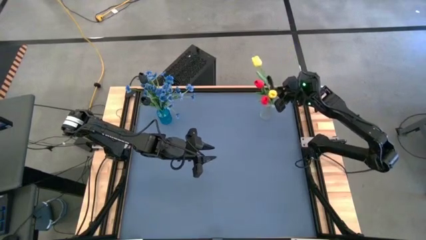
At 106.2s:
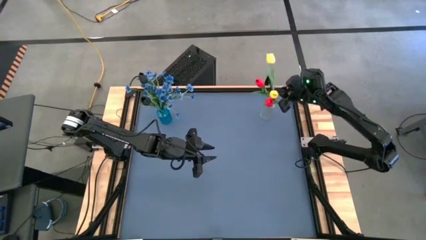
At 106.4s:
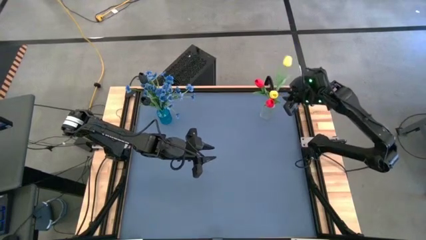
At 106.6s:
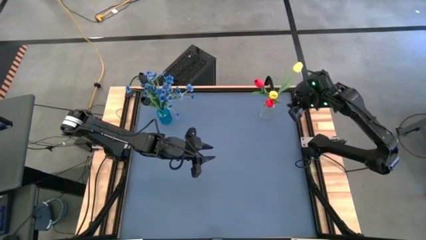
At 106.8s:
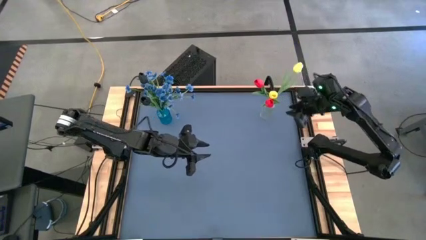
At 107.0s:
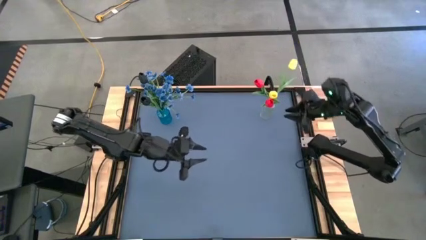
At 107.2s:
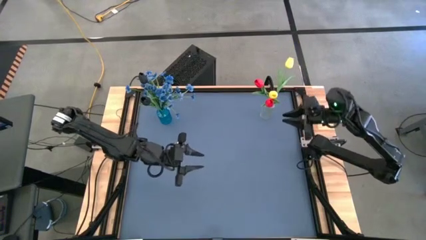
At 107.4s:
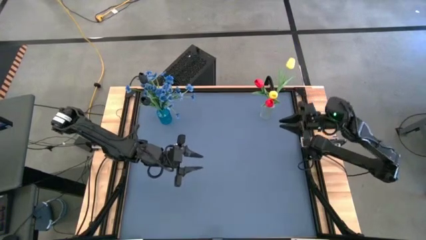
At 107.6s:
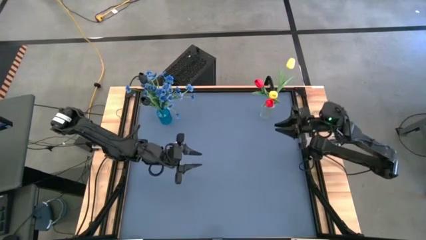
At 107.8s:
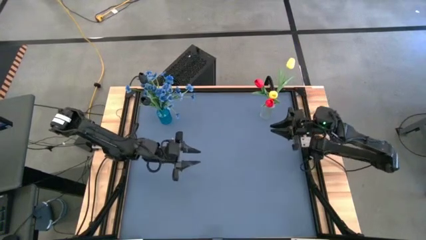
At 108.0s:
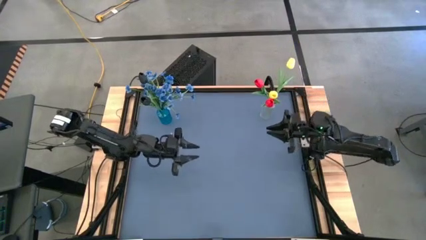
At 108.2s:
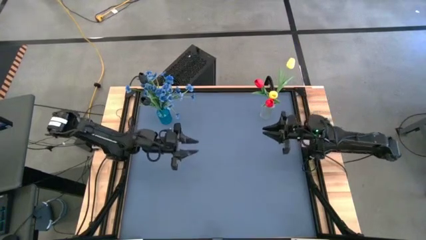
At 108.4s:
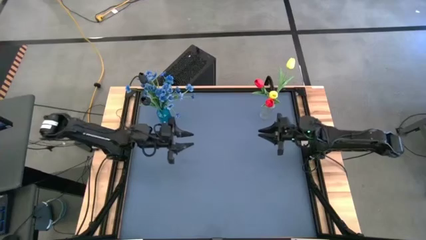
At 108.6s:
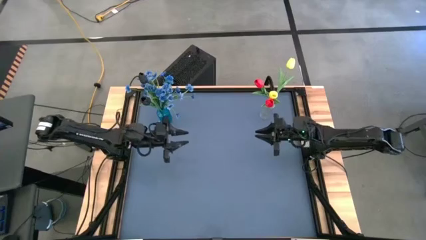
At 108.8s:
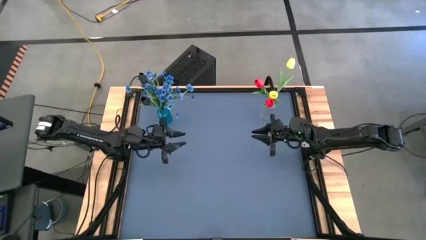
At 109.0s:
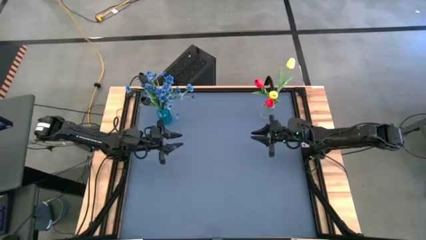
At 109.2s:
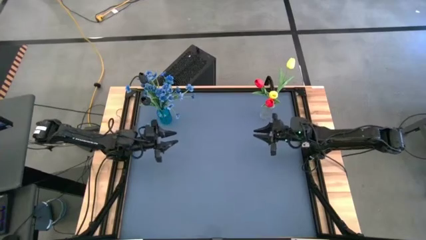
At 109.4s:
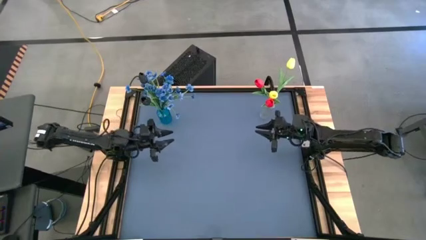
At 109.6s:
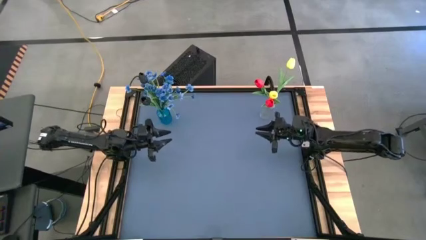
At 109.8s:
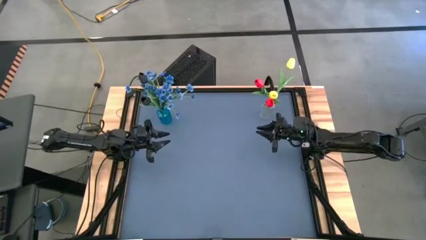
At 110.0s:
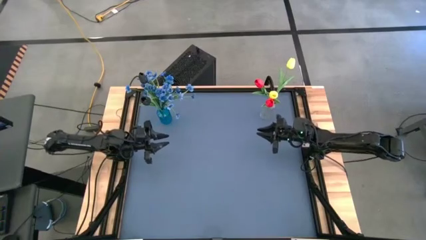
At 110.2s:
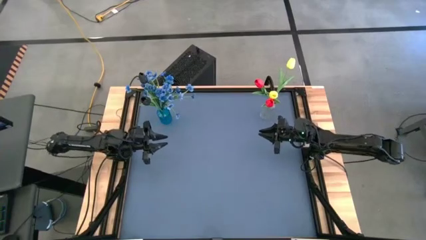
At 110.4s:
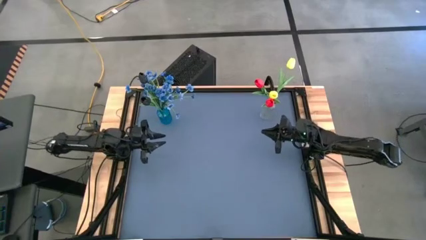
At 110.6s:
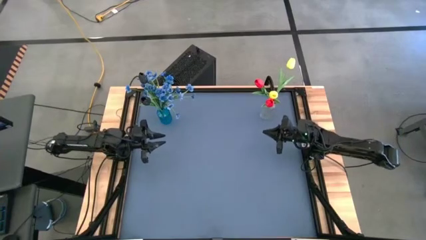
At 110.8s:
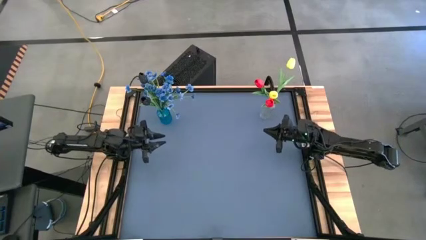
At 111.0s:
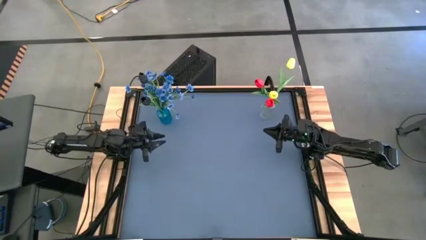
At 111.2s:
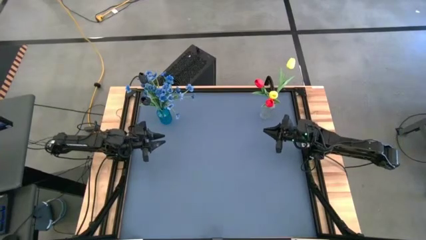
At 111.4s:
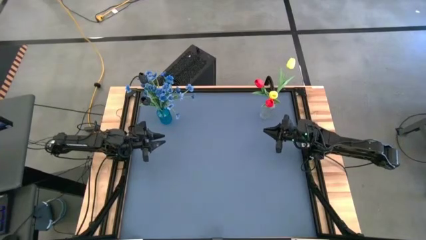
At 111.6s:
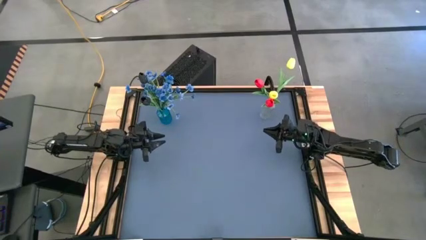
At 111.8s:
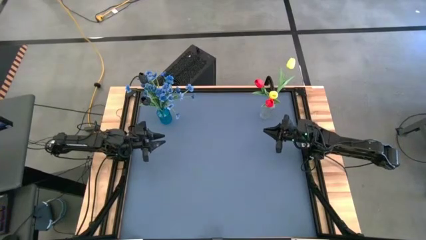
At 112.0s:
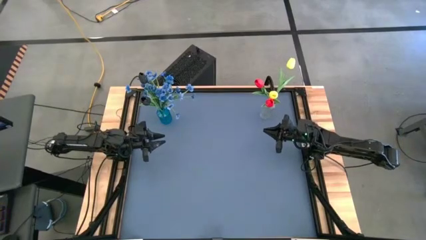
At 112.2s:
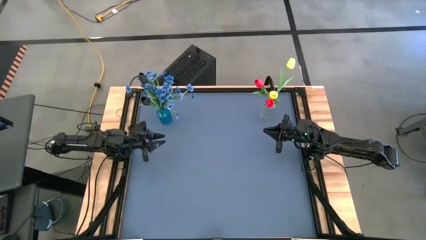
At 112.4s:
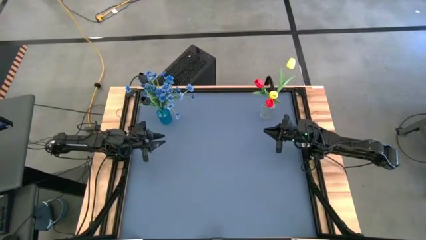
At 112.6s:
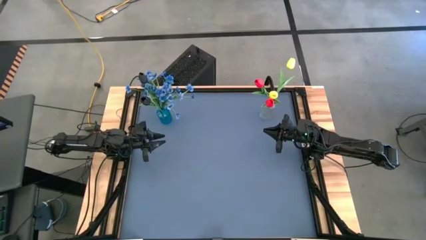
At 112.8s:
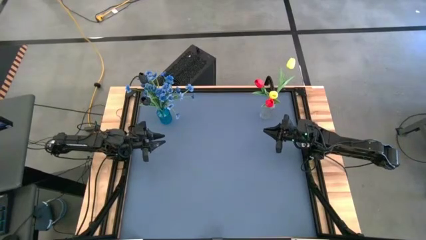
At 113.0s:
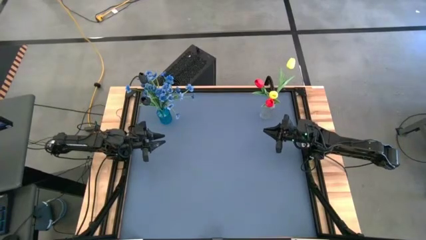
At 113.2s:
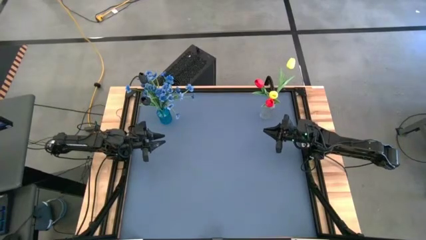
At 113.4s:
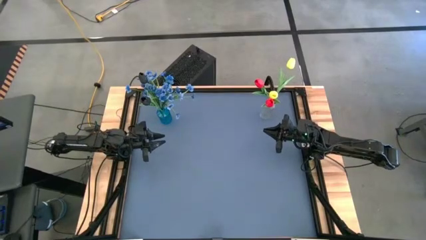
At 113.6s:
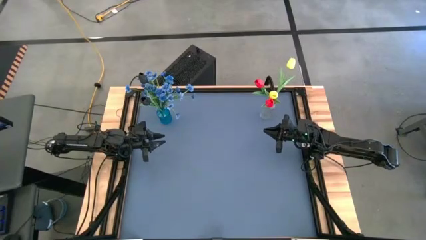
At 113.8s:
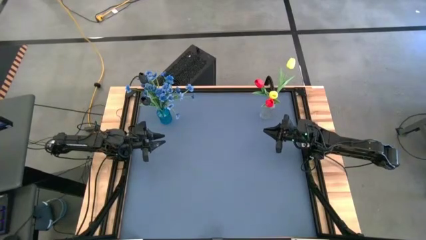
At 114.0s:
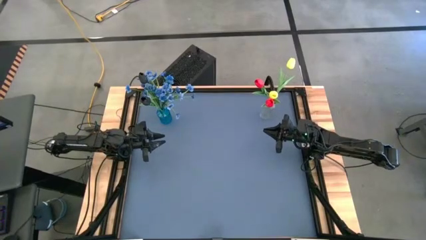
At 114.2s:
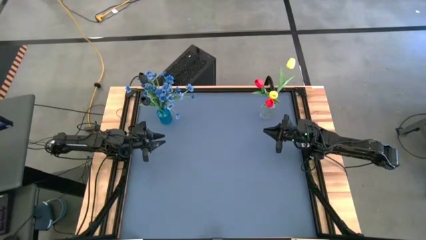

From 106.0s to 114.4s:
Task: Sort flowers into vase by color
Return to Home Position

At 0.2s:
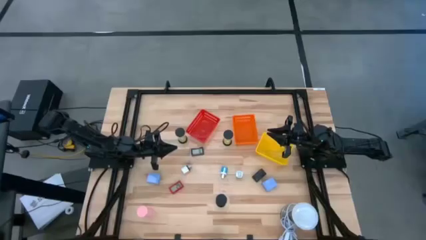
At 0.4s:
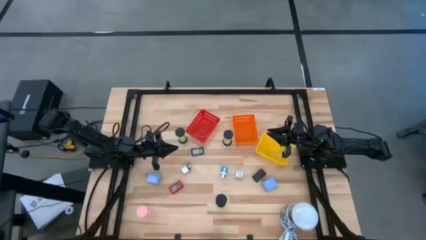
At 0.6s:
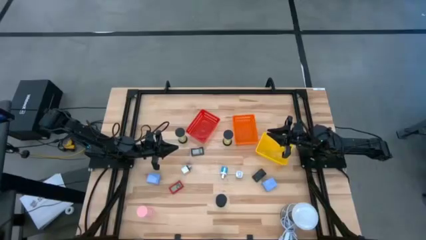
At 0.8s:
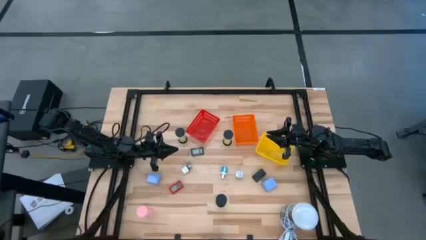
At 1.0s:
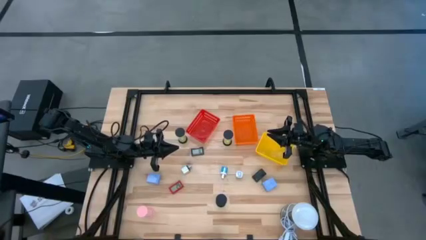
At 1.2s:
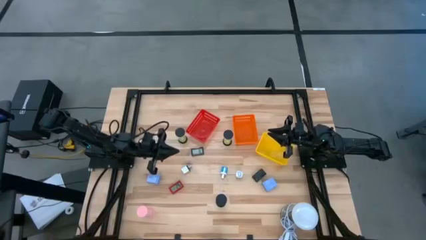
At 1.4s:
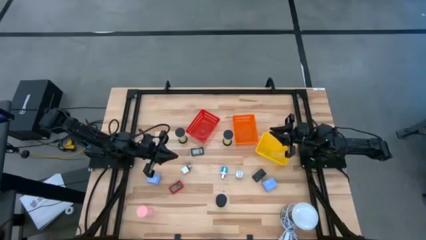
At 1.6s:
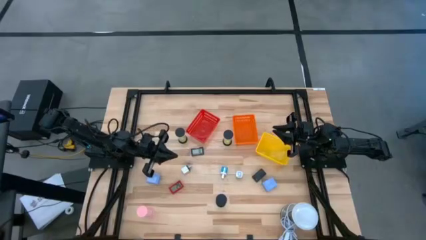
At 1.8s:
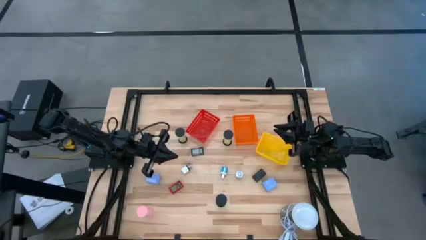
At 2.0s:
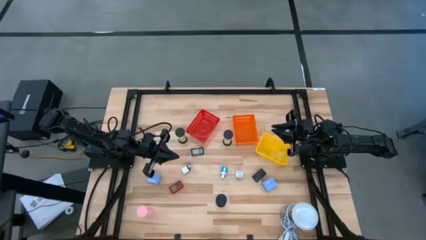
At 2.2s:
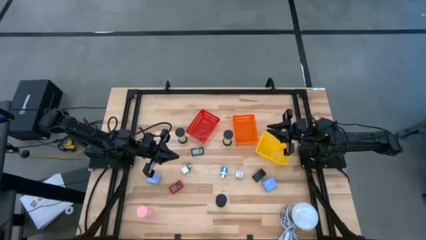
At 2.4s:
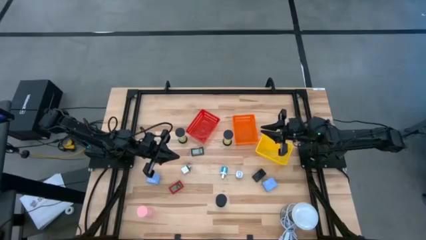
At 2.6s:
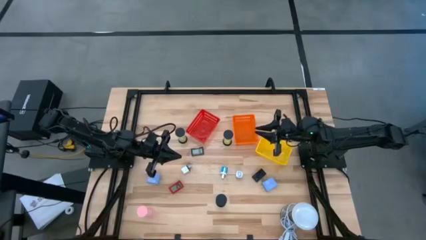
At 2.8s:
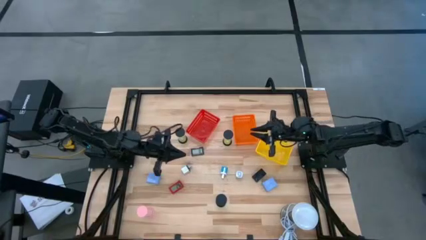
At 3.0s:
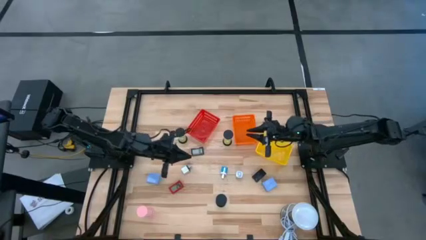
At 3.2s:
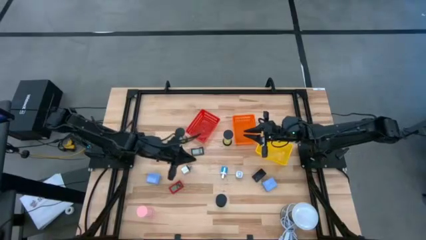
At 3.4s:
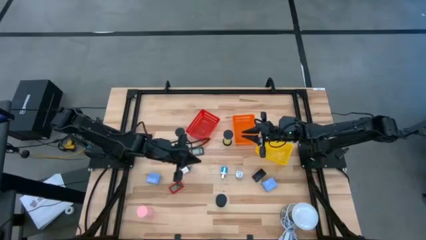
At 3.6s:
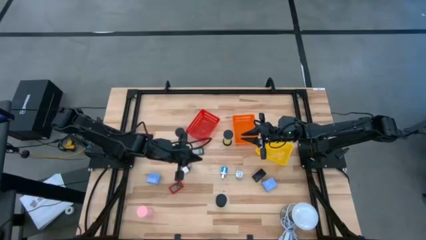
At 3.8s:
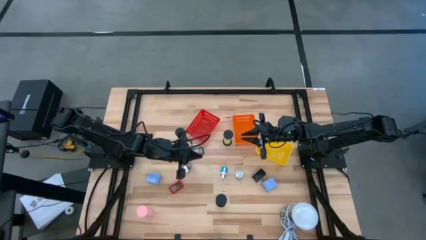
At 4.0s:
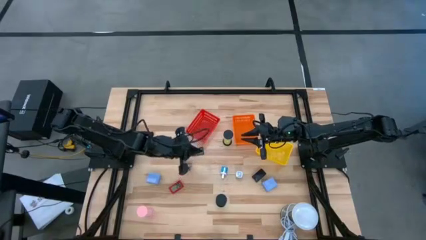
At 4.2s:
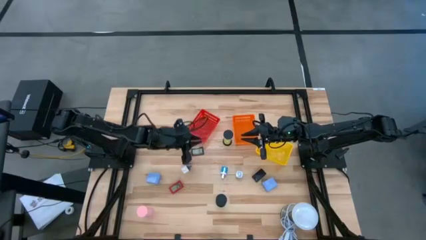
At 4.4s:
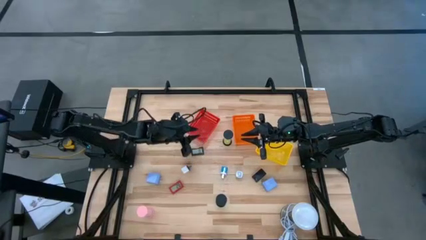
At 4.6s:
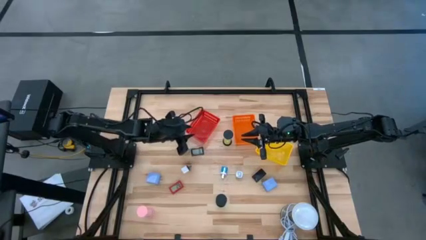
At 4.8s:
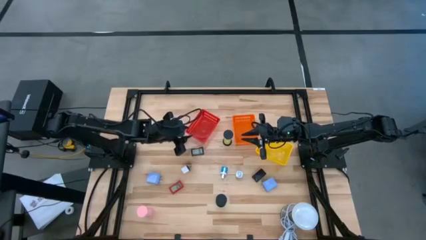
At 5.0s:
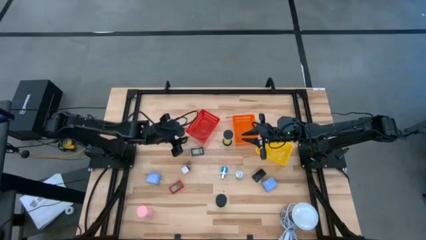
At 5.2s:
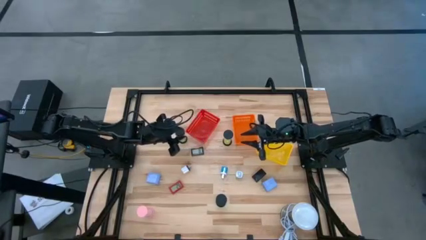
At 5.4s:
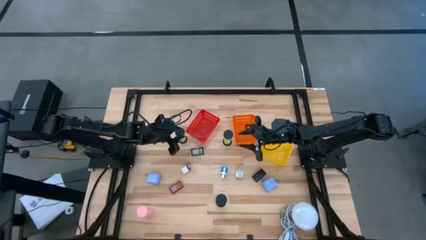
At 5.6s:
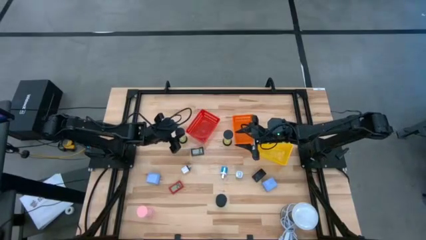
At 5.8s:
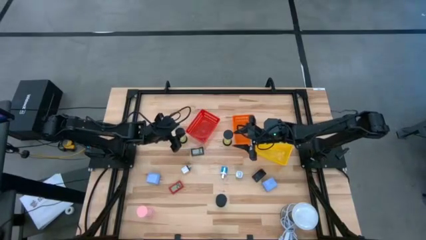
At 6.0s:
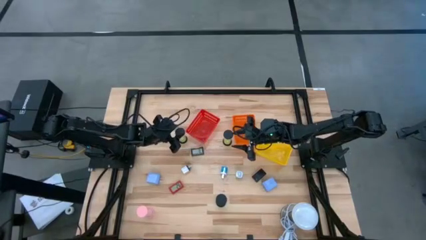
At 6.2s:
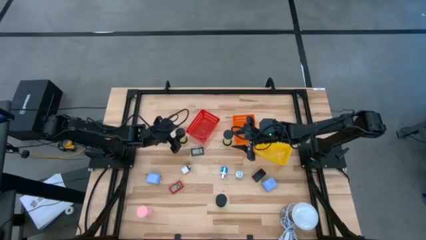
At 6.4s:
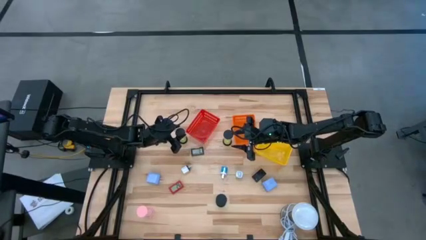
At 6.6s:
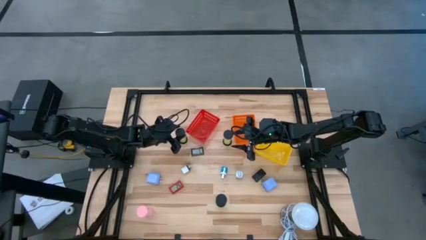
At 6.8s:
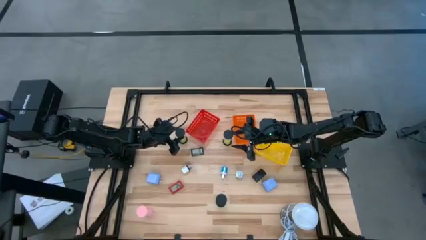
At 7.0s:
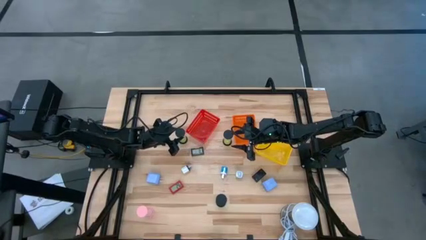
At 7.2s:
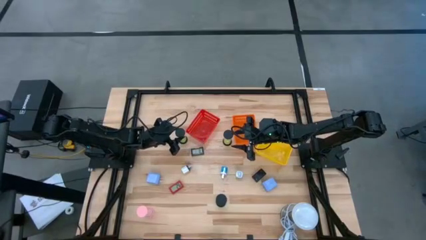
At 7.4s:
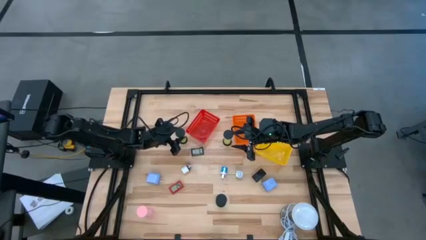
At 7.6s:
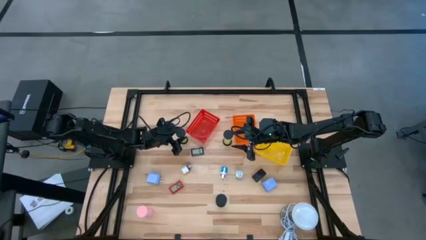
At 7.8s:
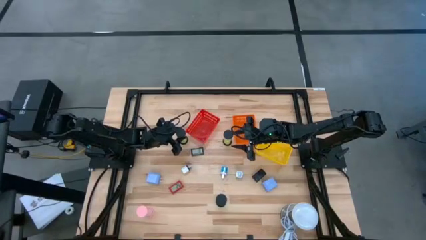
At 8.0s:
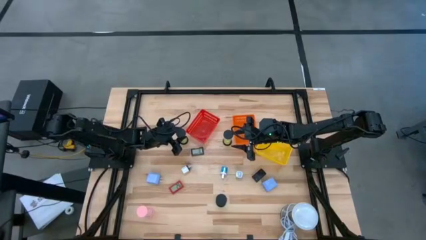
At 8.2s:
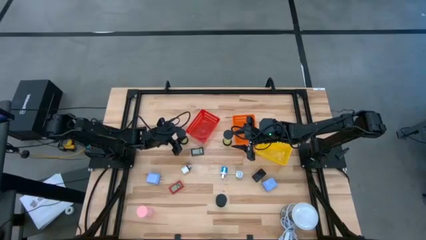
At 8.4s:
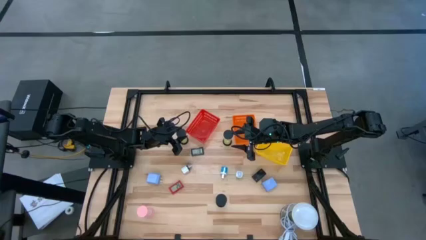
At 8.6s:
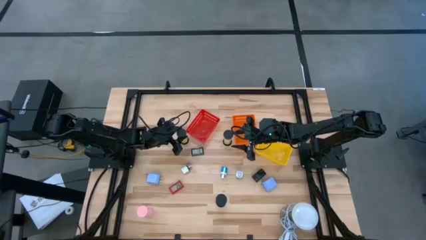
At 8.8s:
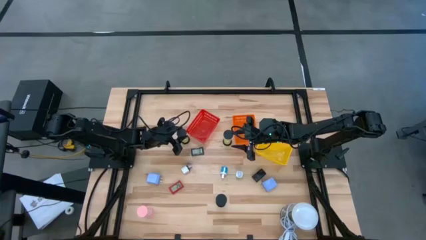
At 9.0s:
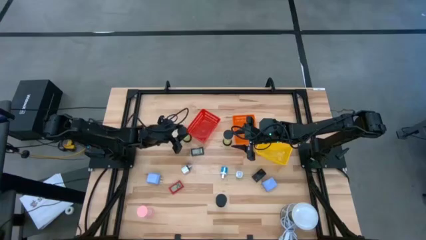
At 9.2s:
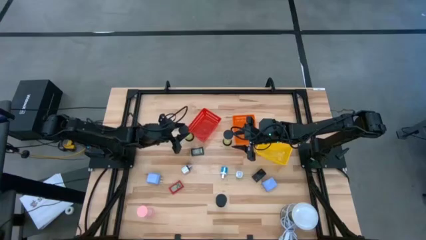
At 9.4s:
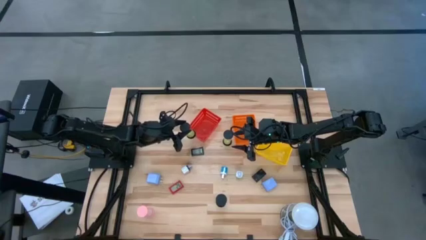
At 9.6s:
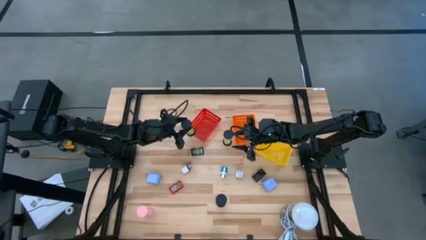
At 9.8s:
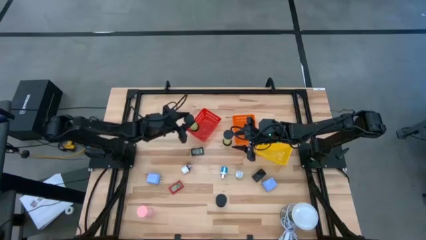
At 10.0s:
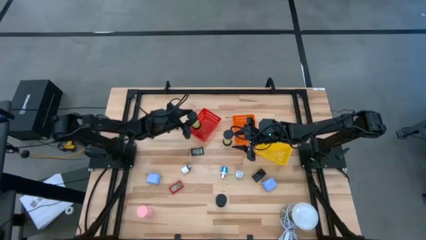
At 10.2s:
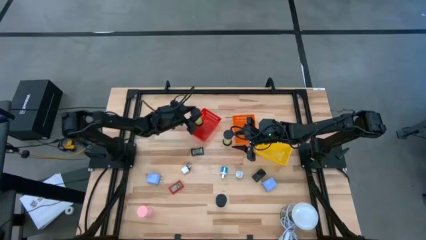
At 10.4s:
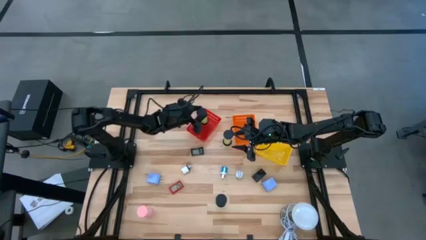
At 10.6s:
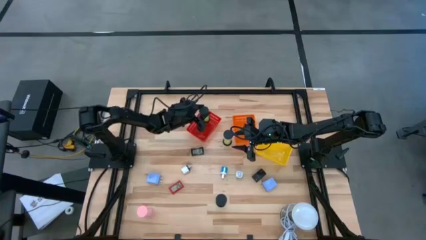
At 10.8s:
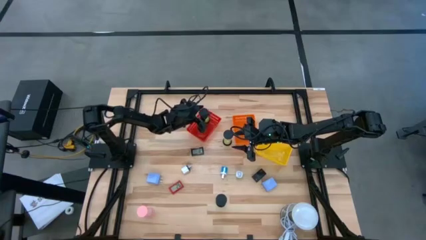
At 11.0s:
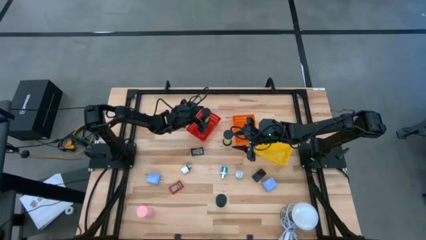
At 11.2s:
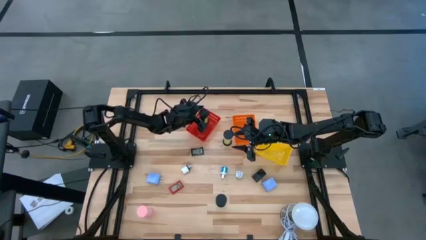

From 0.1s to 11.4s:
Task: Pick & Place Office items
Put the left green hourglass into the red bin
